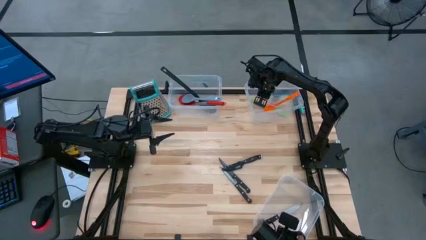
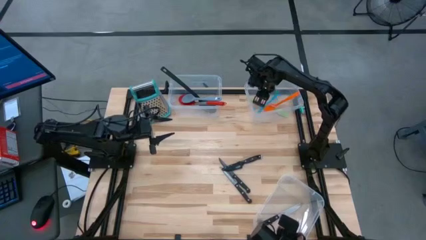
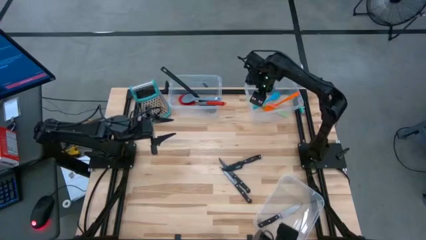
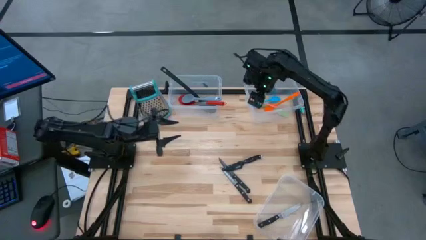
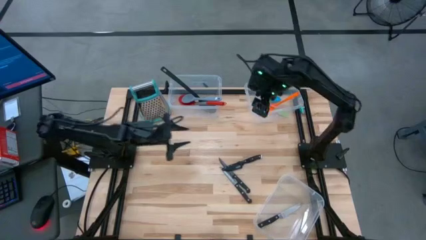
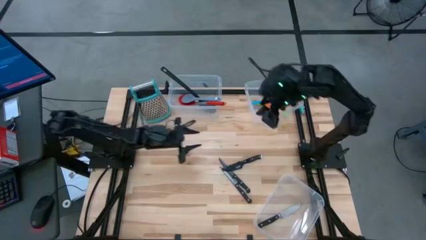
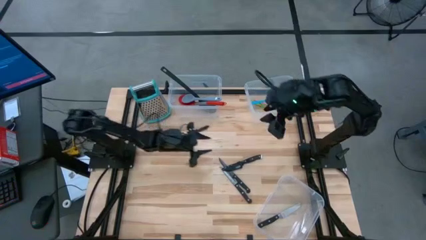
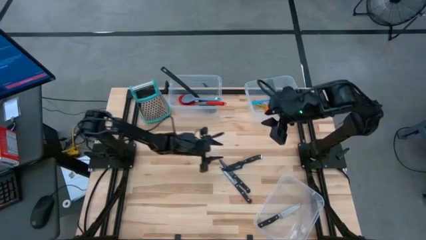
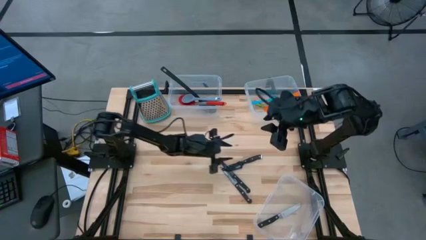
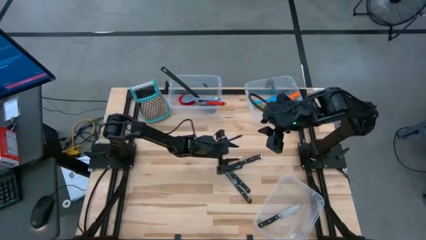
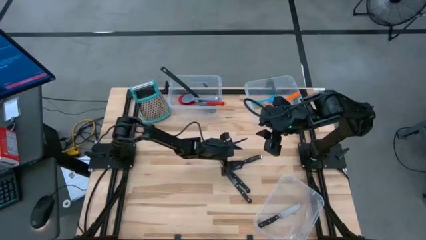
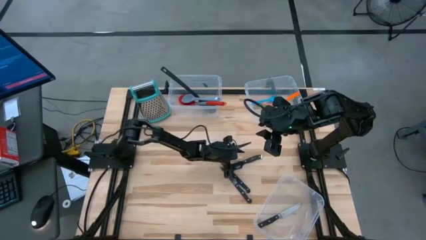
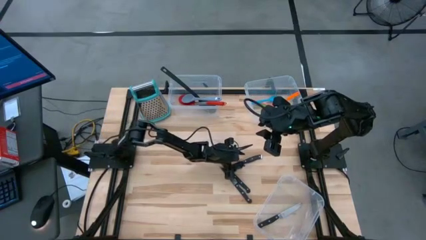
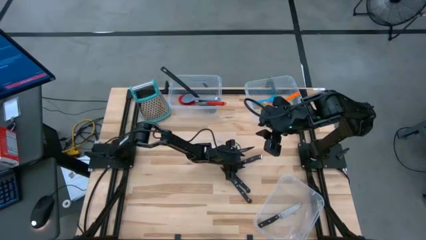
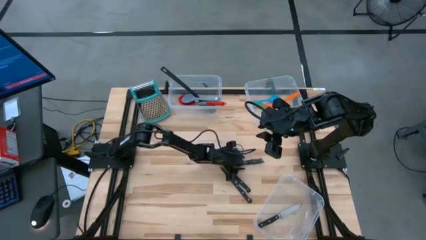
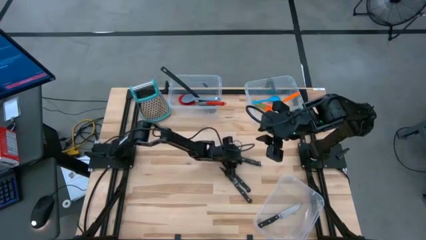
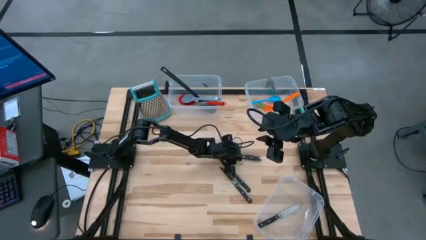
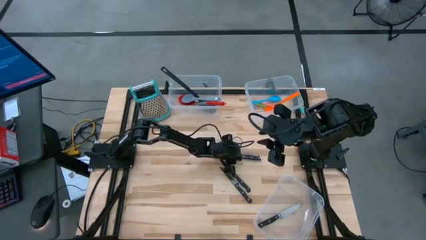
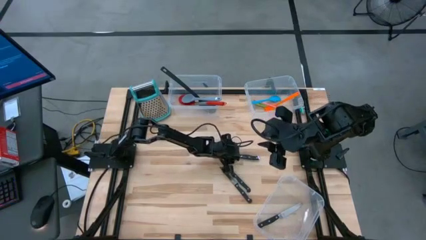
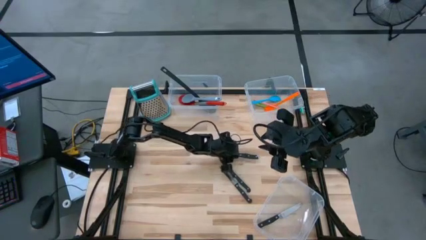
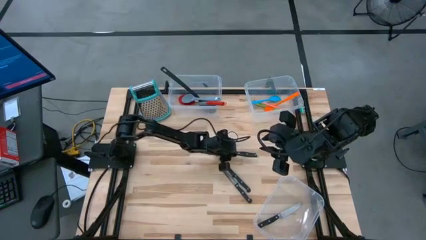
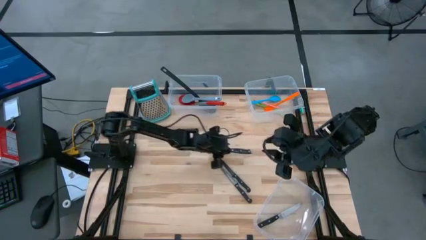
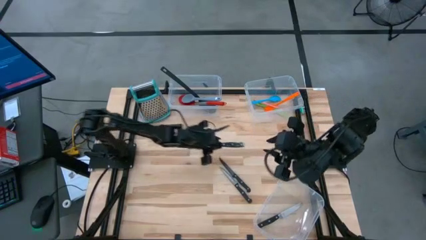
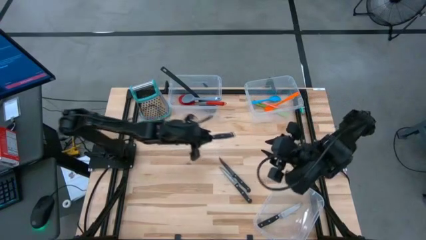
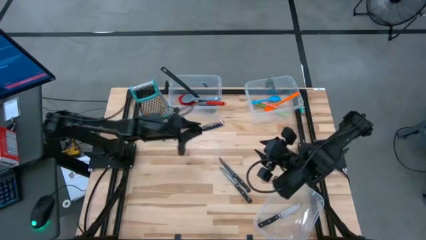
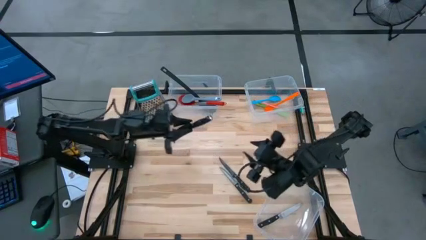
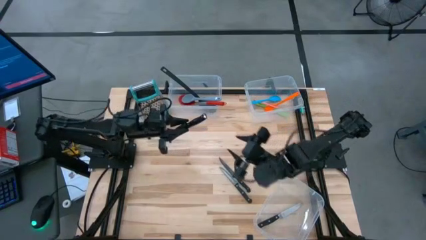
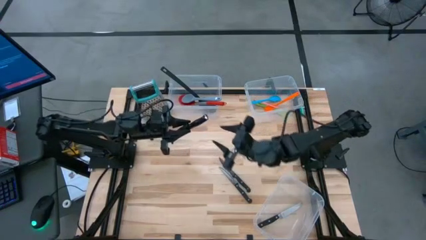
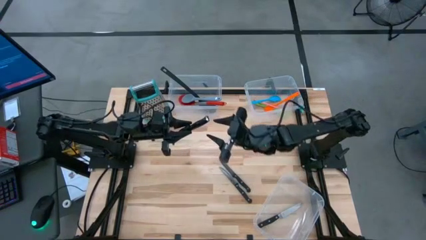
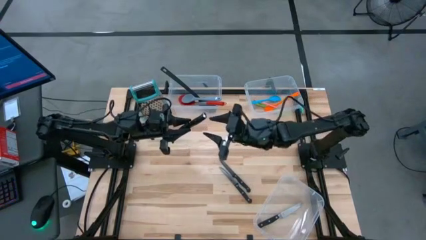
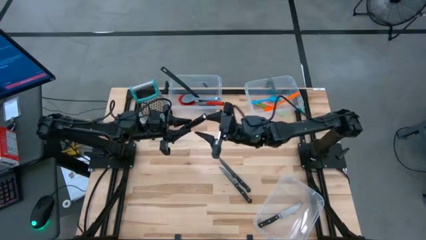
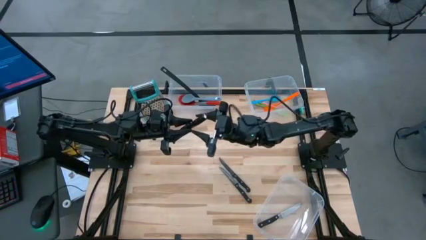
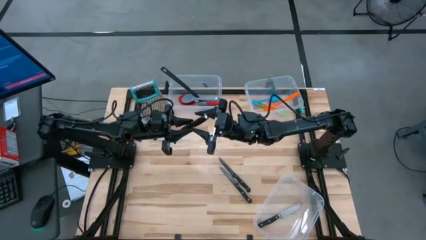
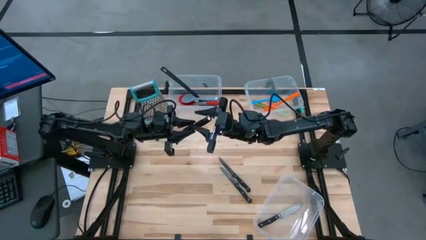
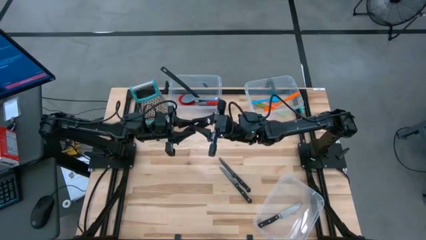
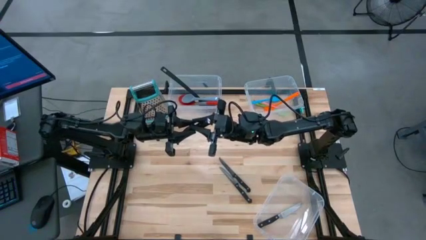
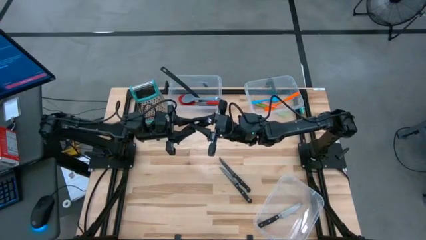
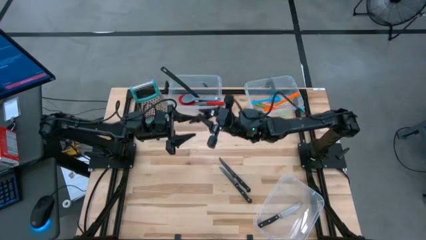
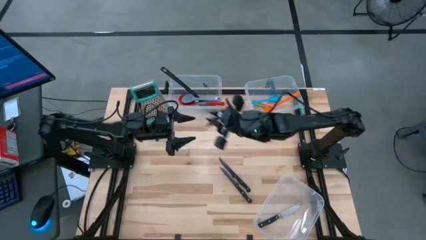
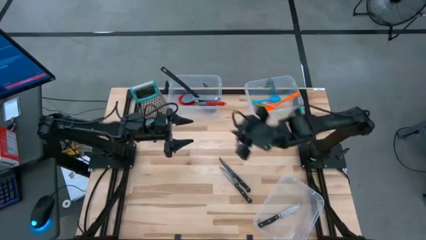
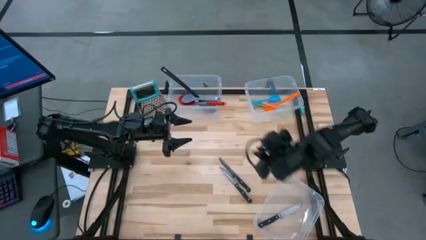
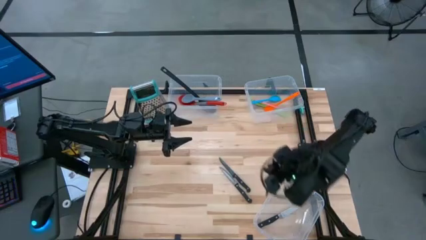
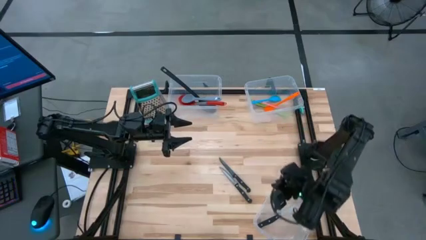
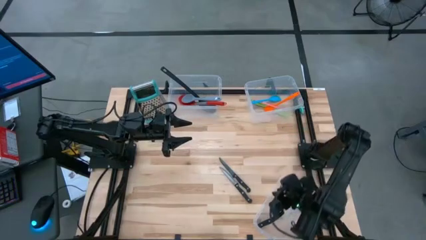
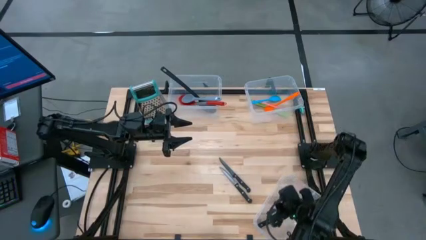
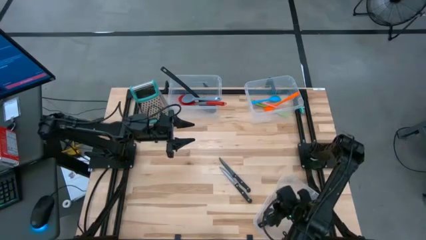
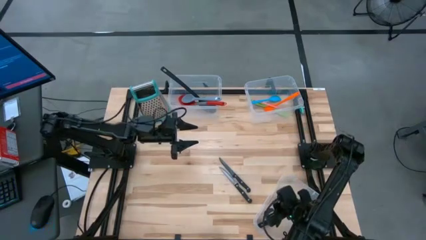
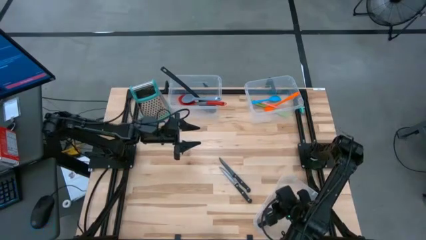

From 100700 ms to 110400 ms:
Task: Pick & Place Kitchen Items
Put the black knife into the bottom transparent bin

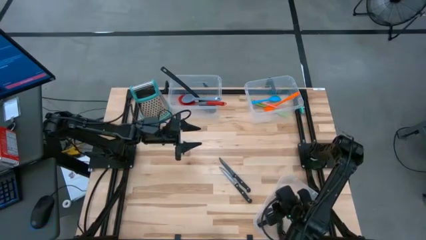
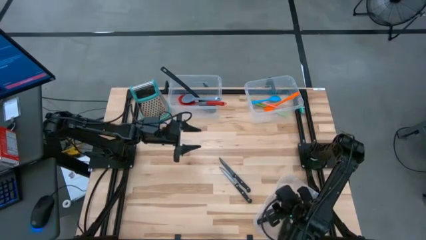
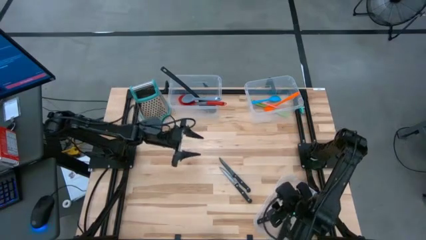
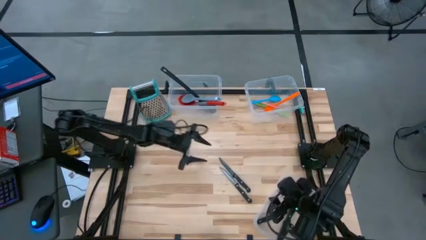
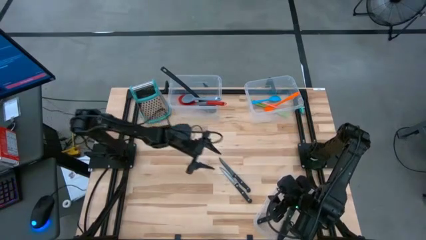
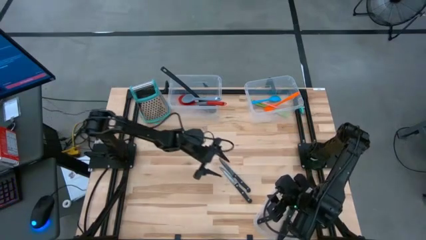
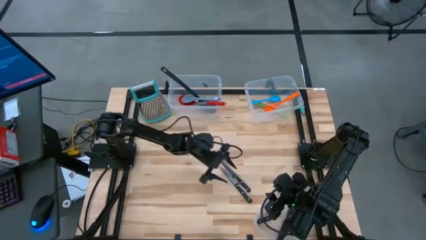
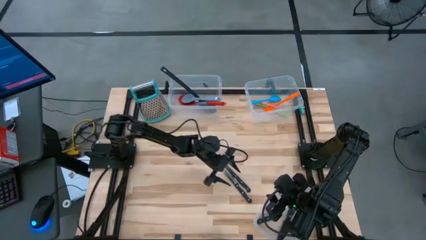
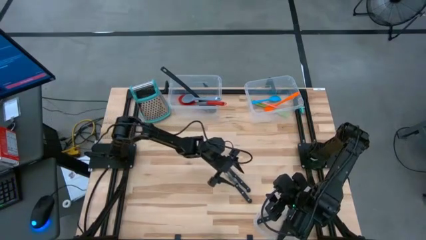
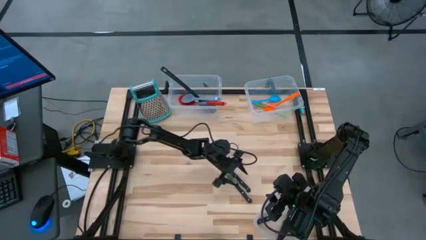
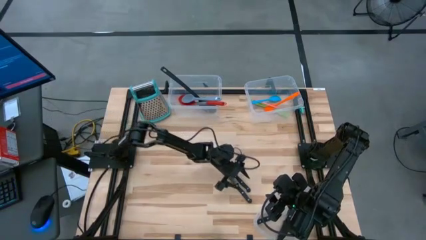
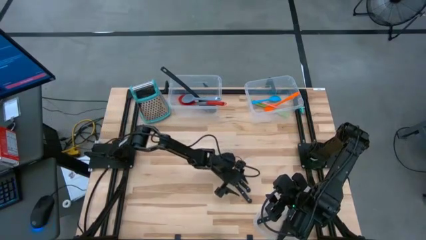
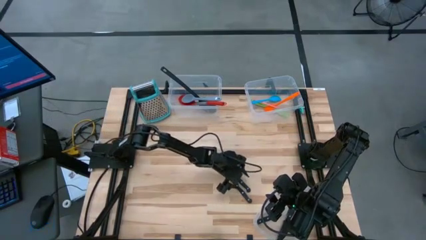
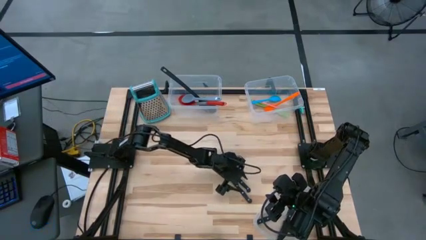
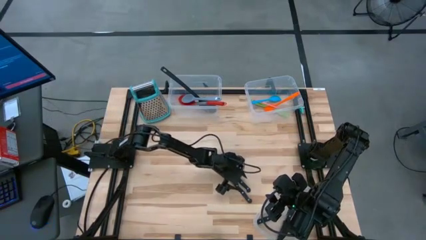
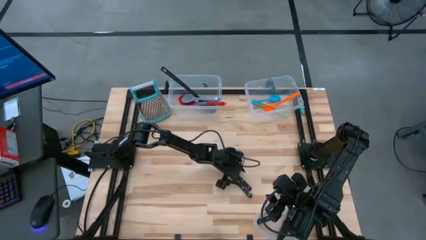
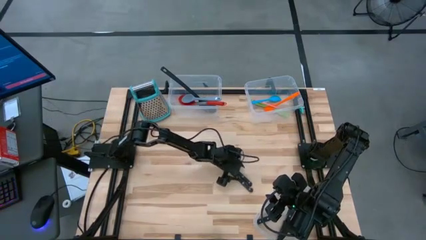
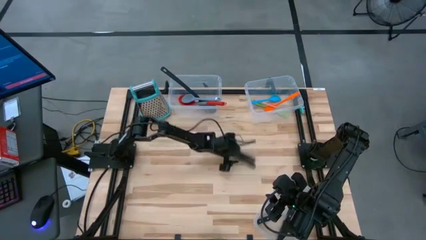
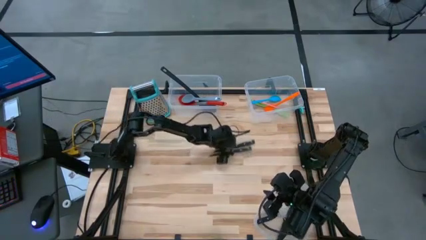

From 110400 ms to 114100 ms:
Move the silver knives to the center of the table
